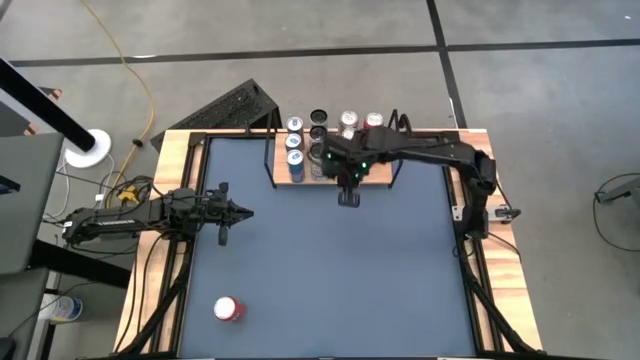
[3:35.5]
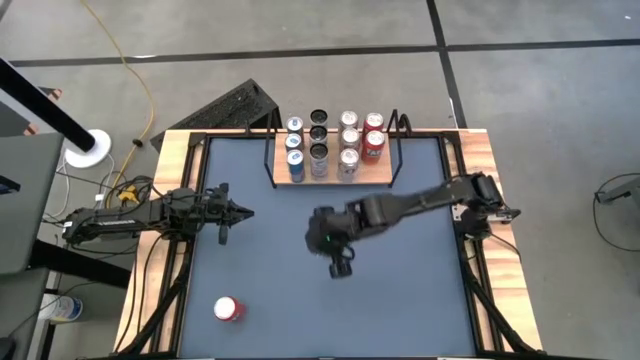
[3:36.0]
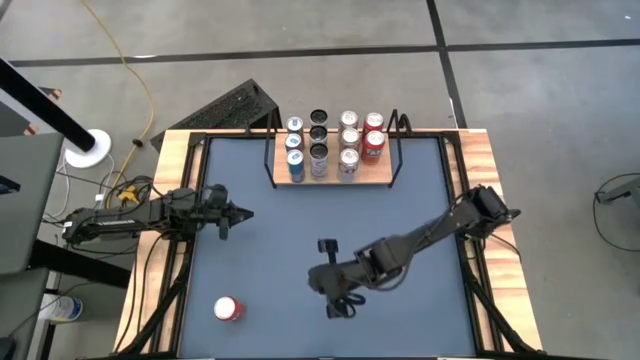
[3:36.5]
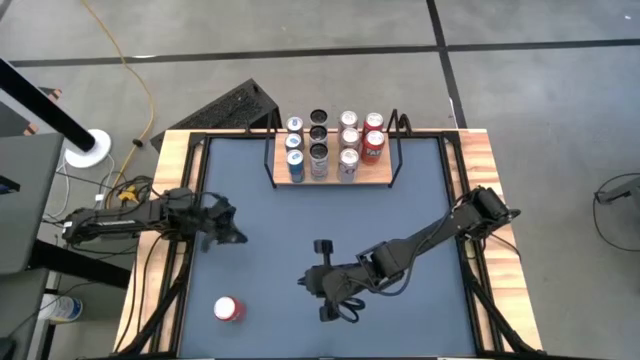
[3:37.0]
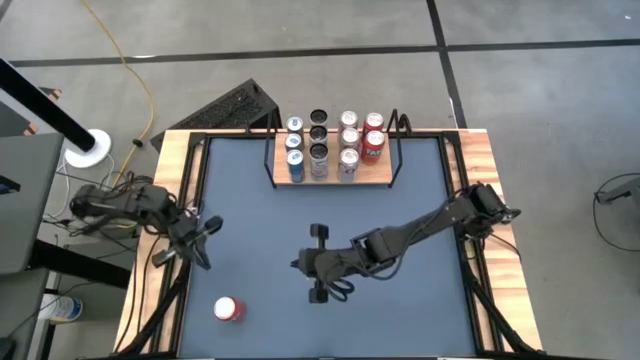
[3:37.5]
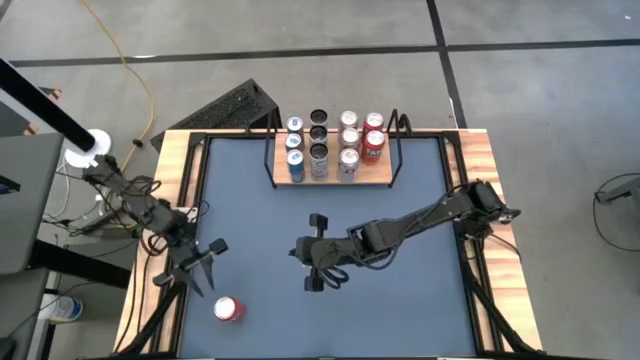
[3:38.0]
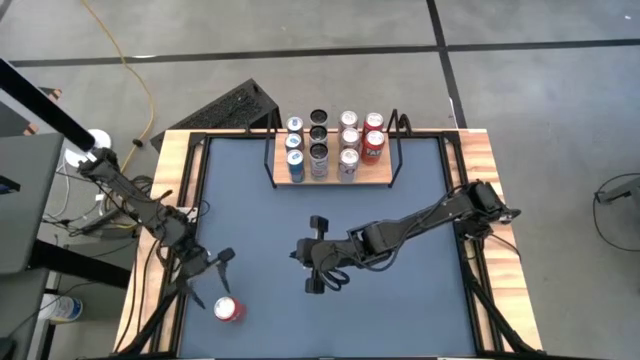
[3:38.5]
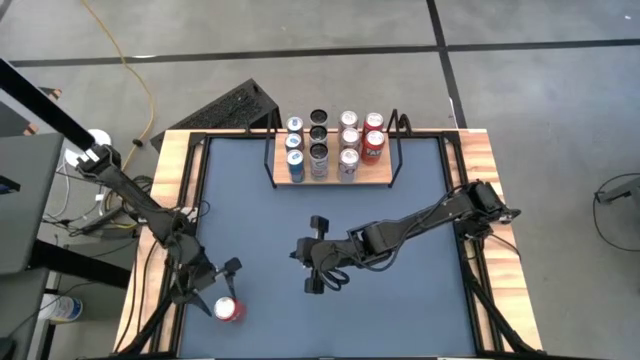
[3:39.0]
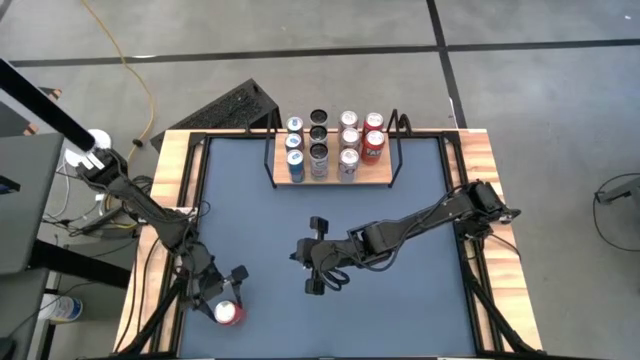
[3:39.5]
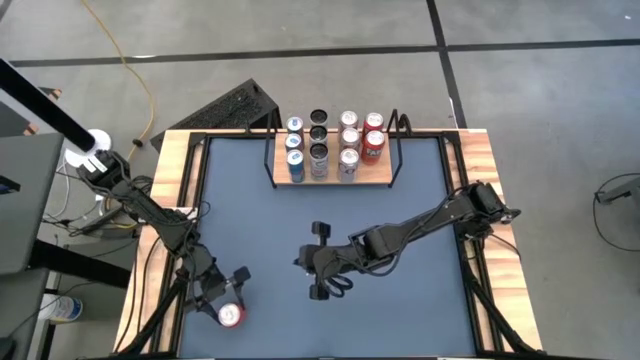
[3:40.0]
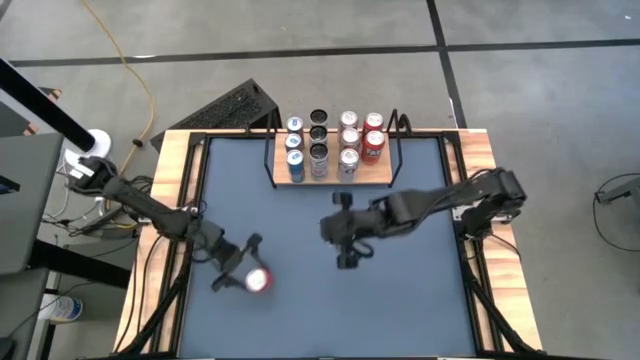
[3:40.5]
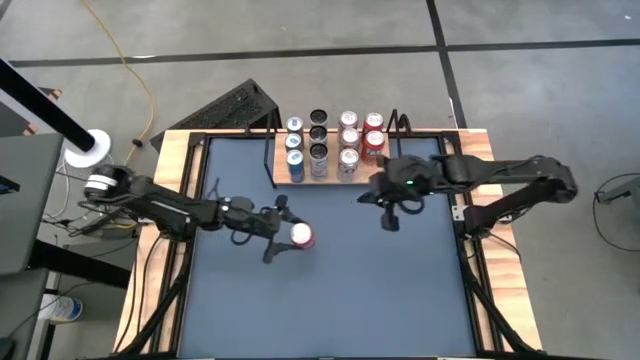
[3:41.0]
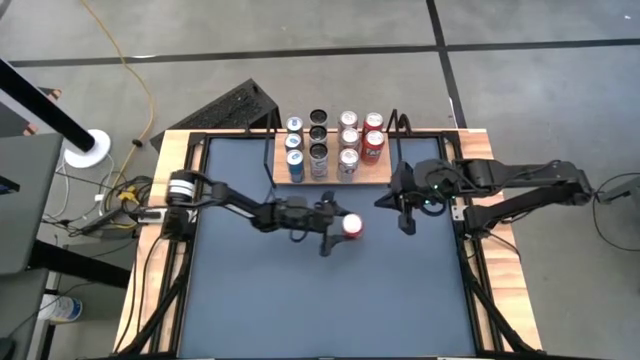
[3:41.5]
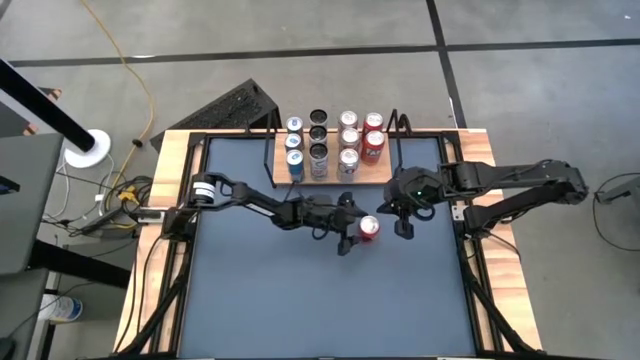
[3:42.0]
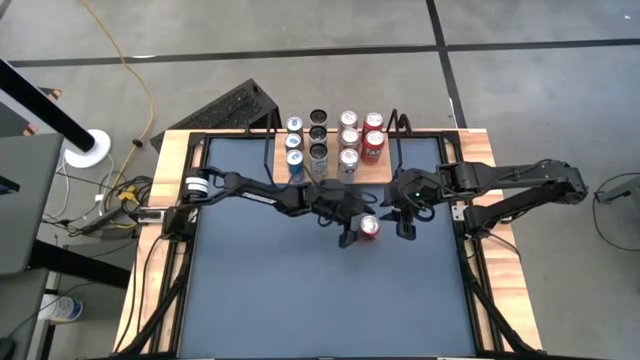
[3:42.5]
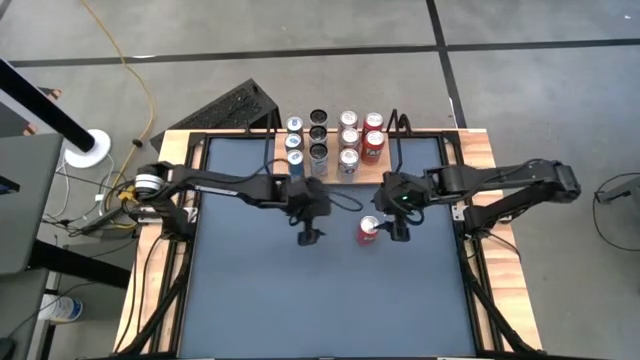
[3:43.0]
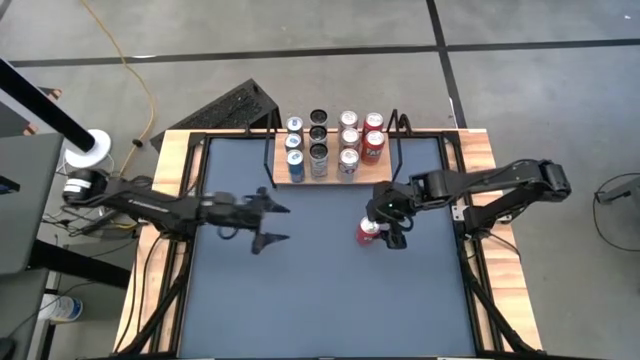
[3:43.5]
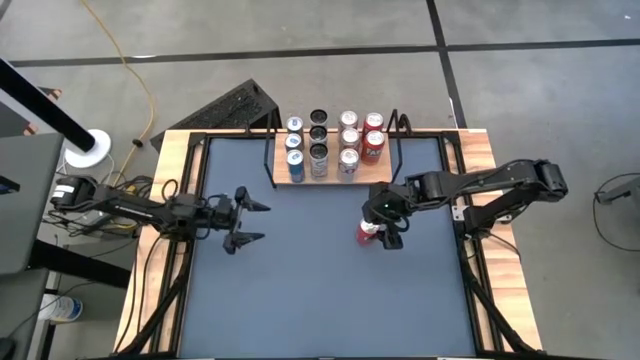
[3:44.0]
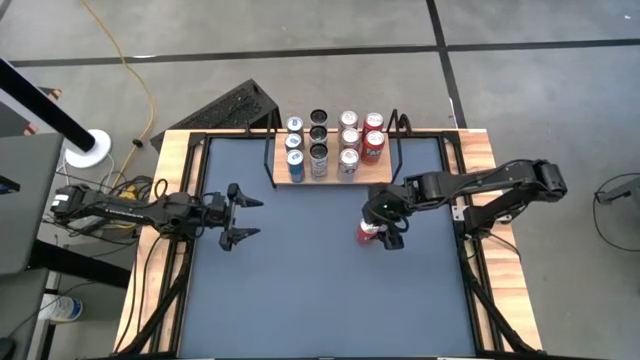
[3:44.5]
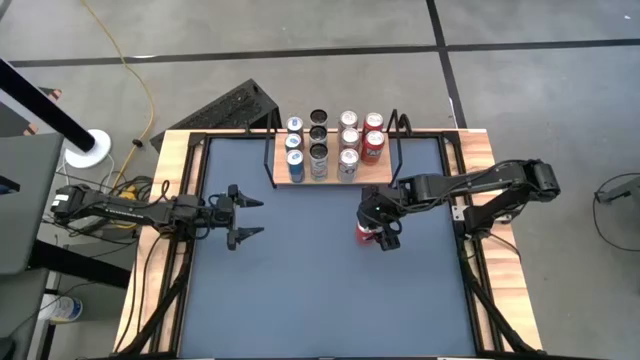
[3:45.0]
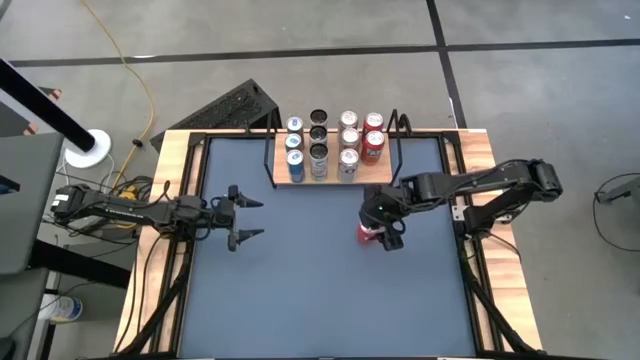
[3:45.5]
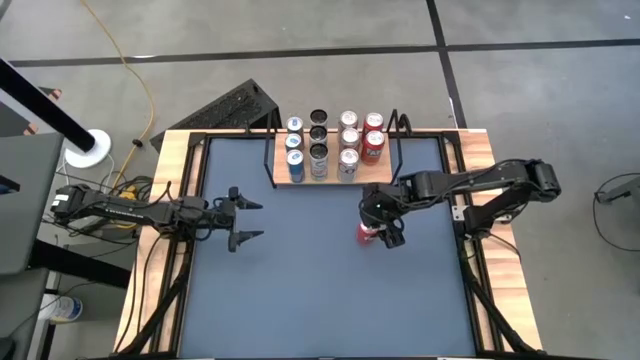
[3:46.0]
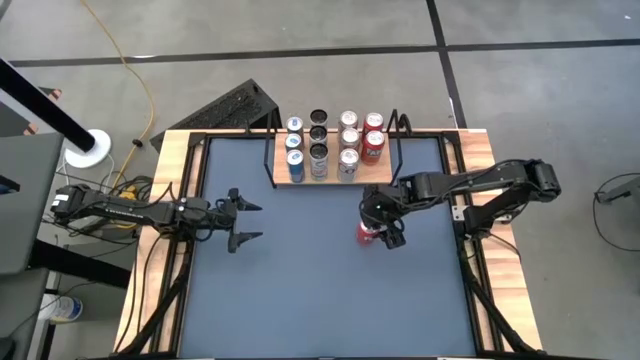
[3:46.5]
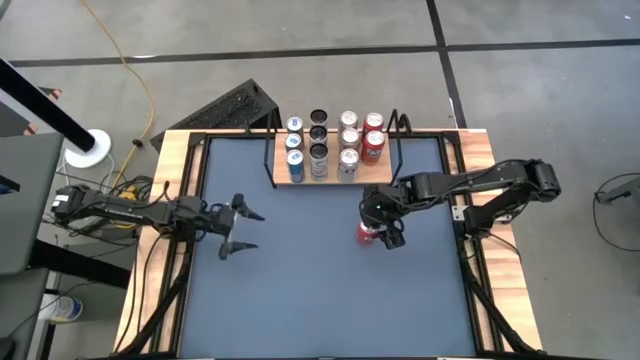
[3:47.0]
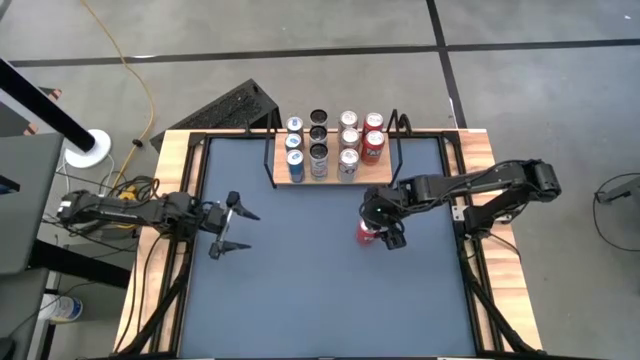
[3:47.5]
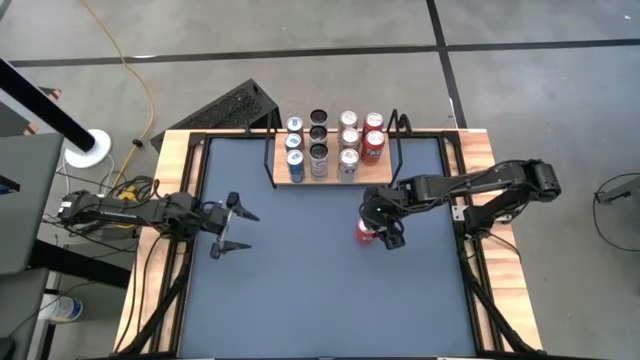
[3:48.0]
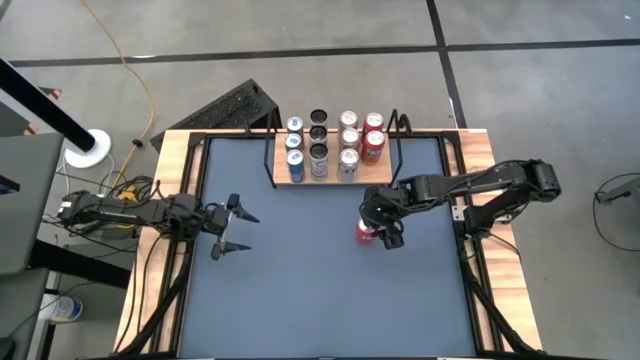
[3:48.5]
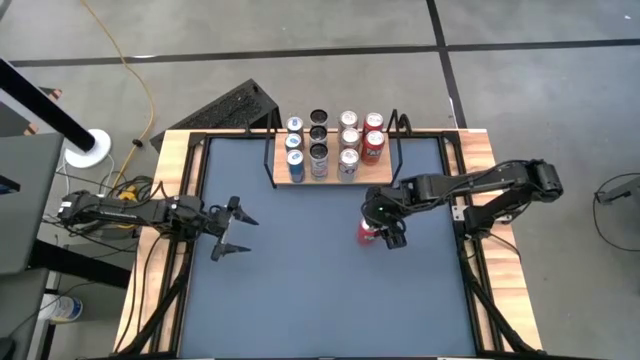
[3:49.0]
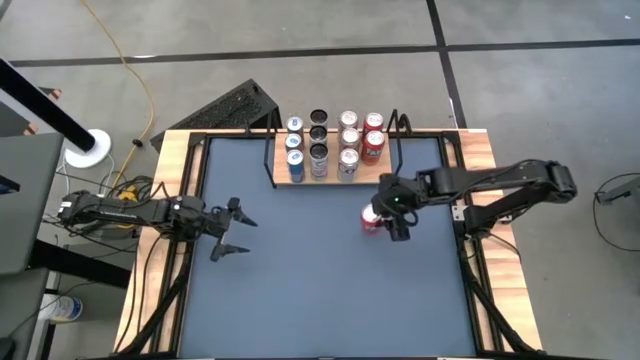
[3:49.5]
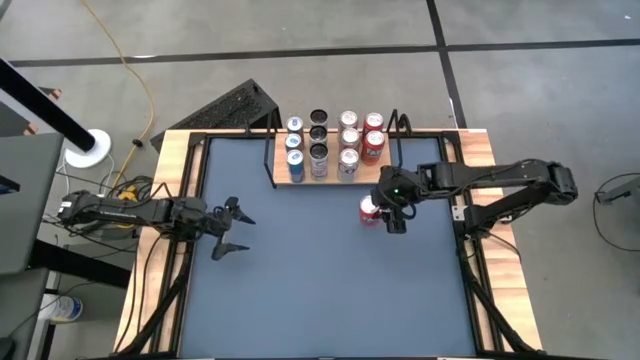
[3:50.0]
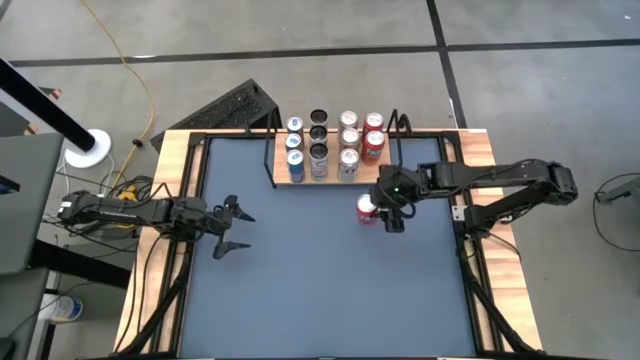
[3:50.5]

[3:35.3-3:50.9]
Task: Place canned beverage on shelf
Put the red soda can on the shelf aligned with the other red soda can

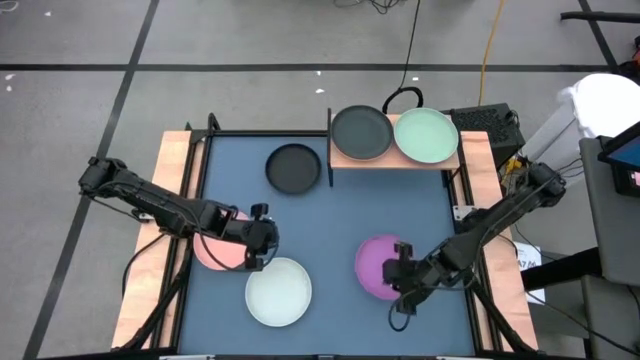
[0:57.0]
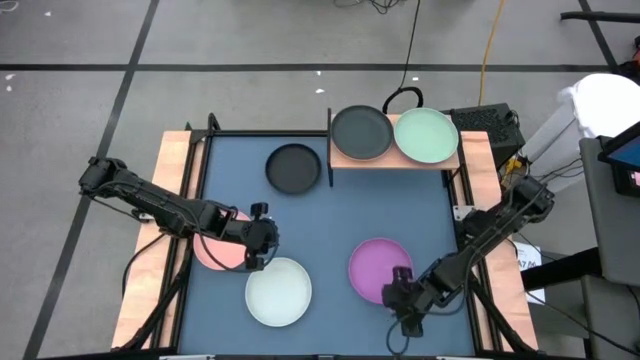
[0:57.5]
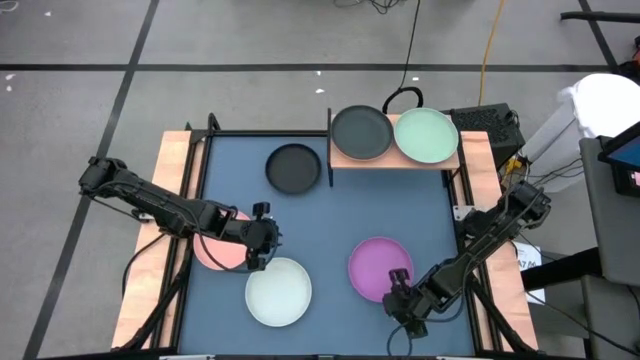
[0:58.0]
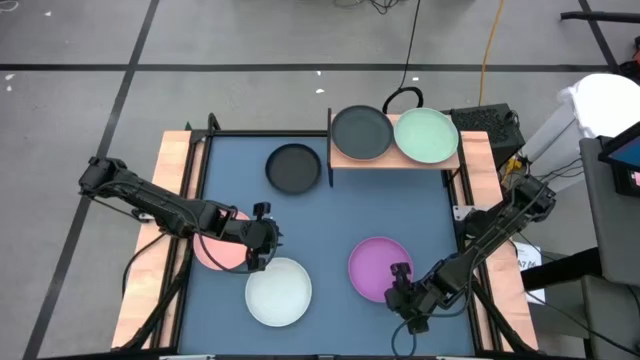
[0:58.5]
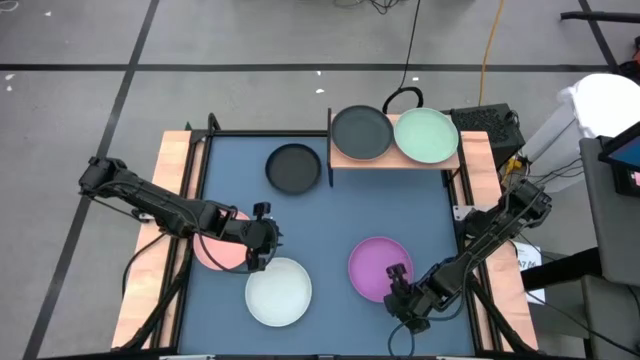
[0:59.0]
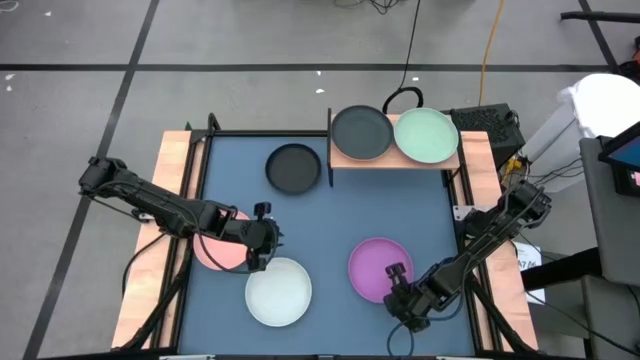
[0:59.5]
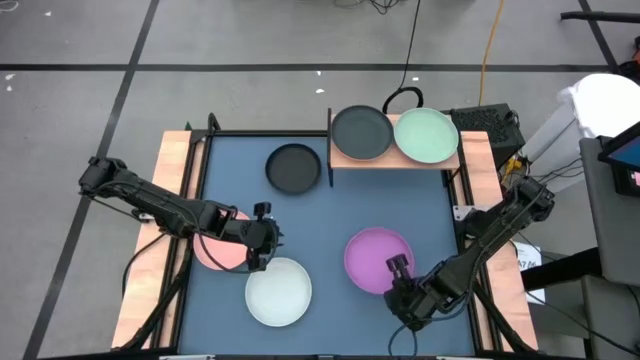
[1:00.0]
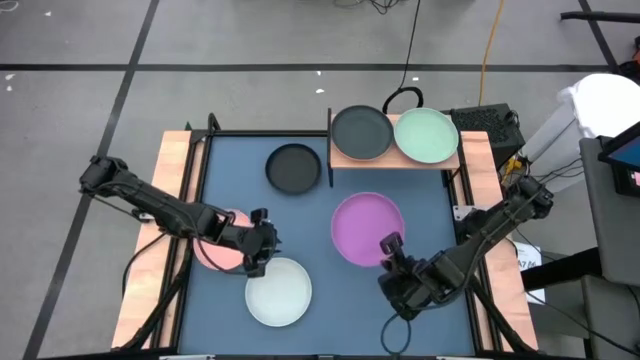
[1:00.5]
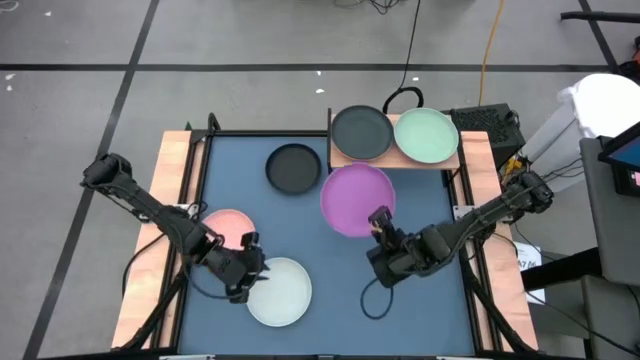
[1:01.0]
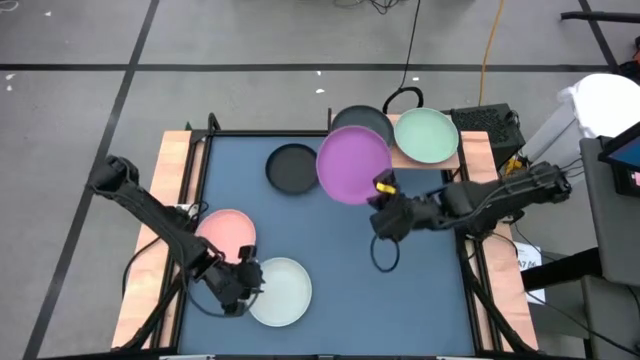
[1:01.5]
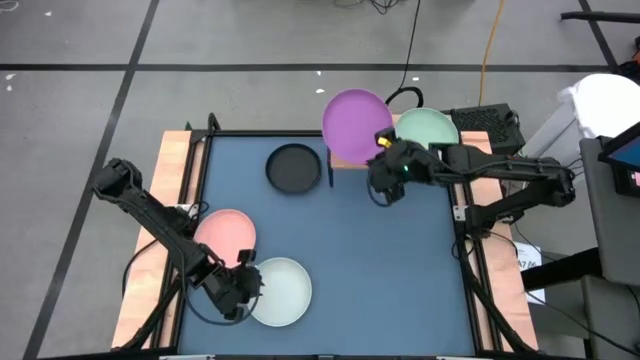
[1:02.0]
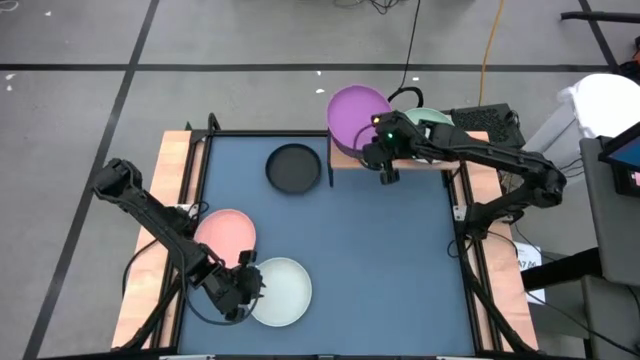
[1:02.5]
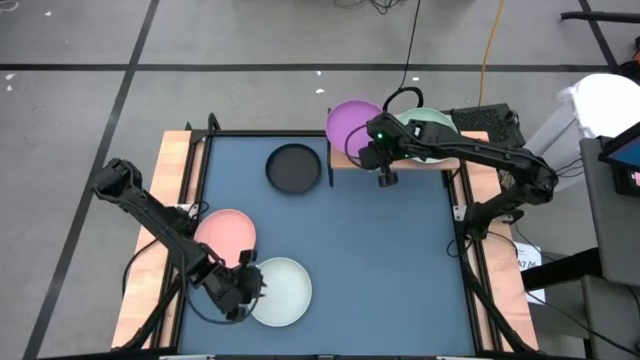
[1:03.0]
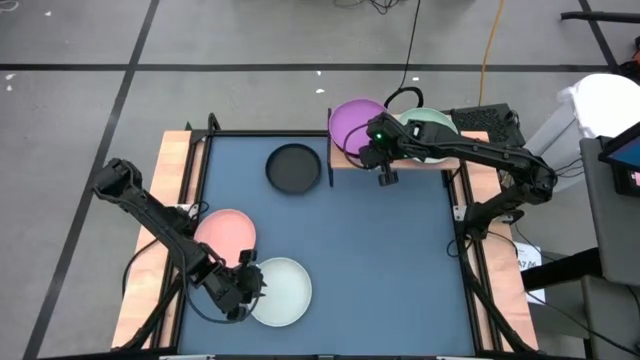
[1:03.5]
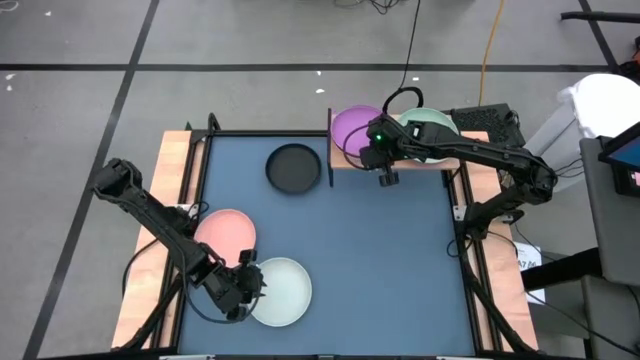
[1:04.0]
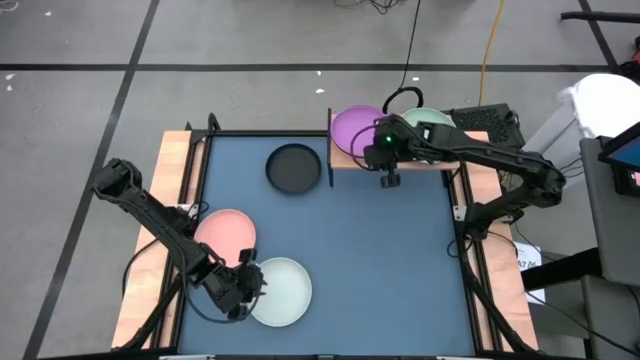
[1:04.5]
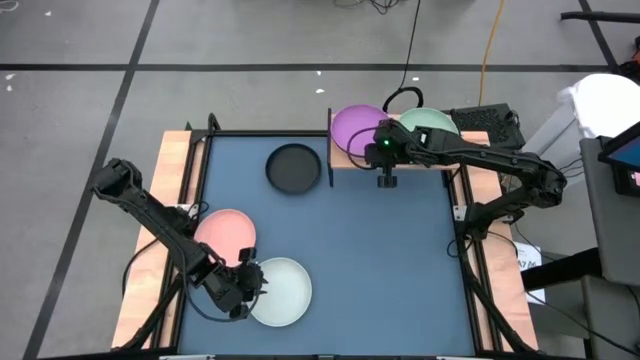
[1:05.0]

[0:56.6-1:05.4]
Task: Place and stack plates onto a shelf
Stack the purple plate on top of the black plate on the shelf
